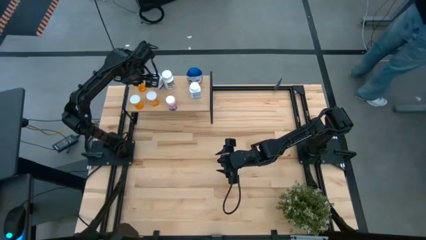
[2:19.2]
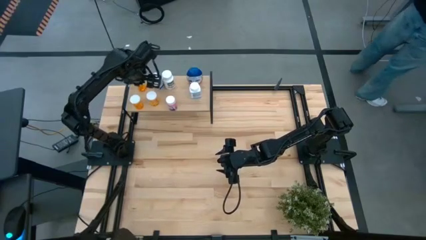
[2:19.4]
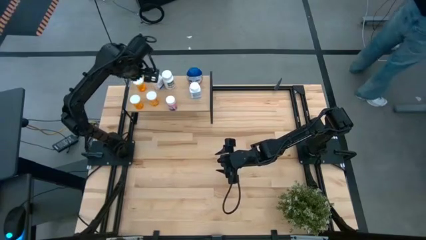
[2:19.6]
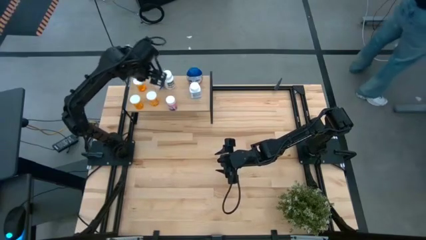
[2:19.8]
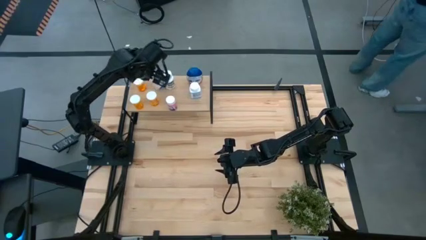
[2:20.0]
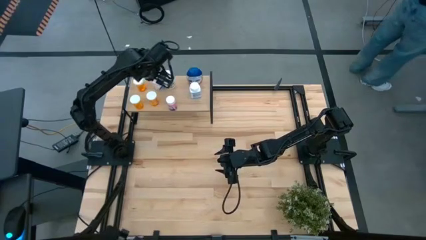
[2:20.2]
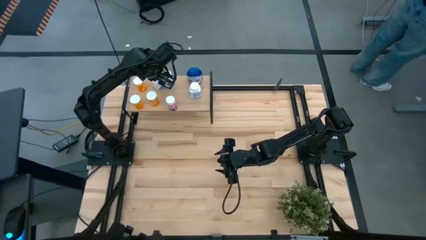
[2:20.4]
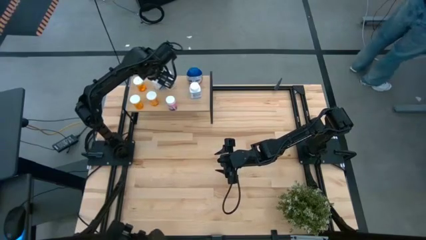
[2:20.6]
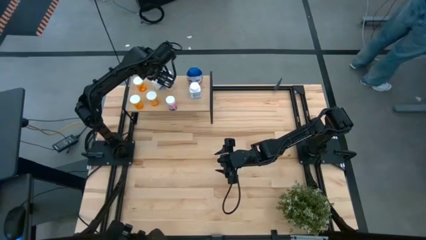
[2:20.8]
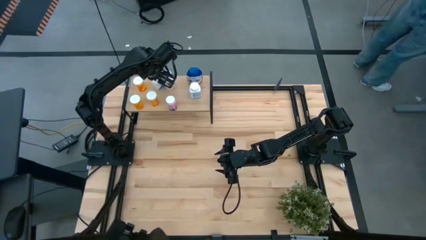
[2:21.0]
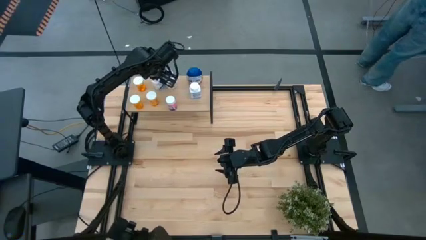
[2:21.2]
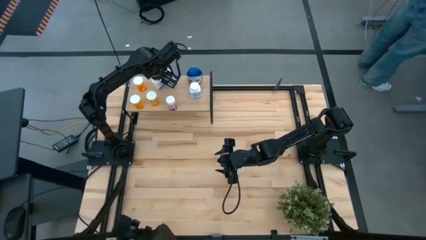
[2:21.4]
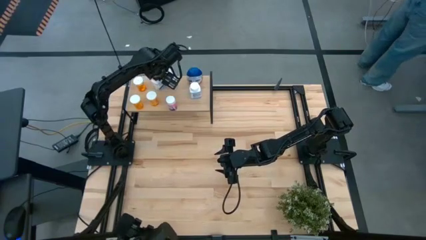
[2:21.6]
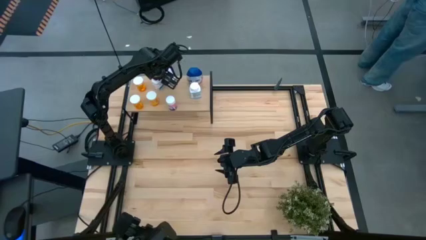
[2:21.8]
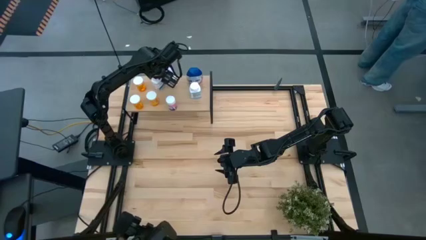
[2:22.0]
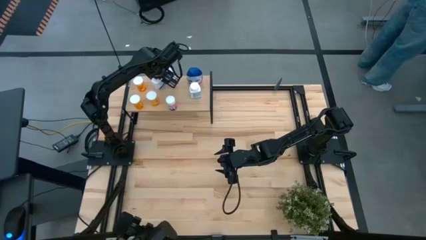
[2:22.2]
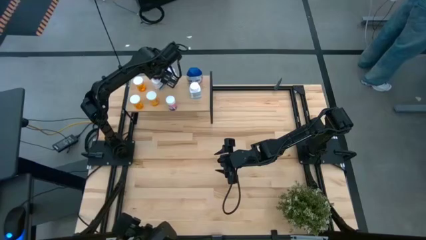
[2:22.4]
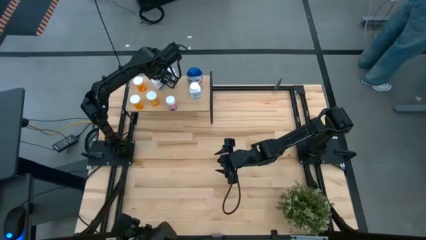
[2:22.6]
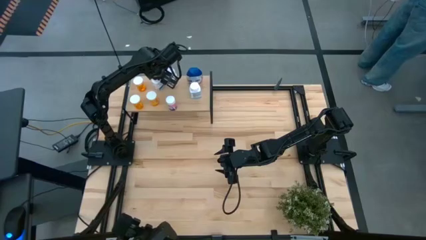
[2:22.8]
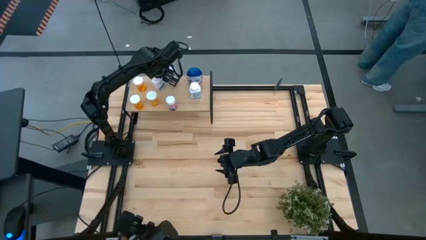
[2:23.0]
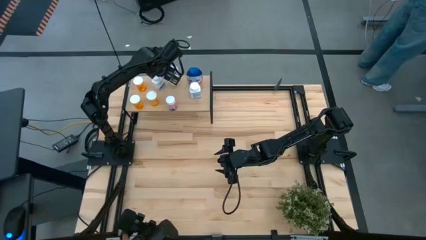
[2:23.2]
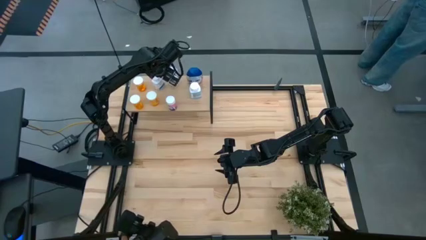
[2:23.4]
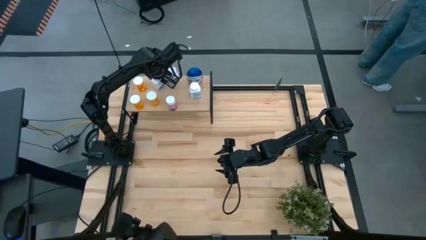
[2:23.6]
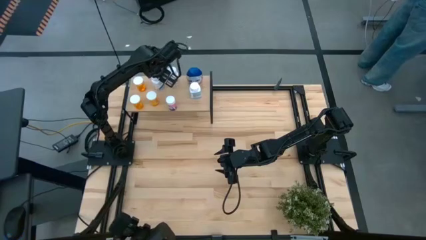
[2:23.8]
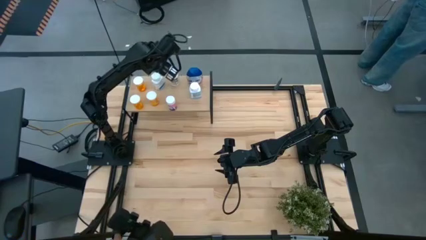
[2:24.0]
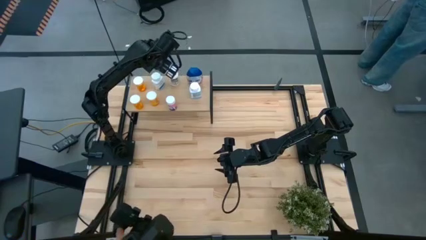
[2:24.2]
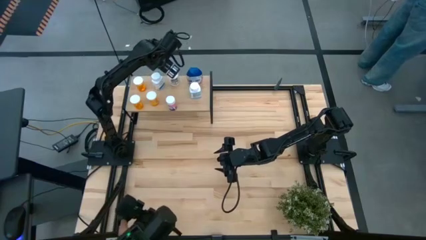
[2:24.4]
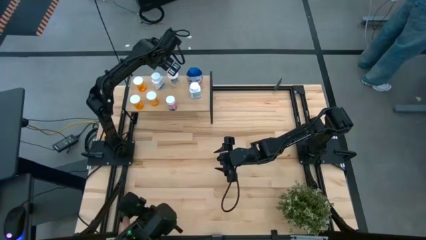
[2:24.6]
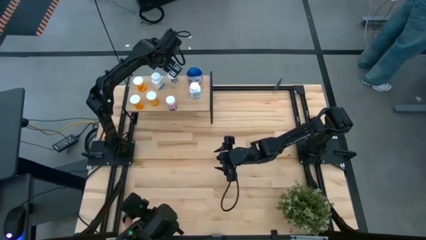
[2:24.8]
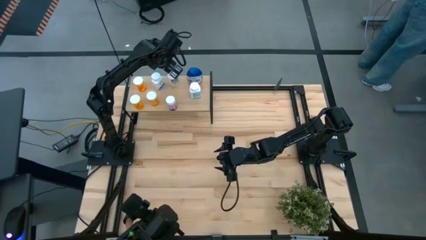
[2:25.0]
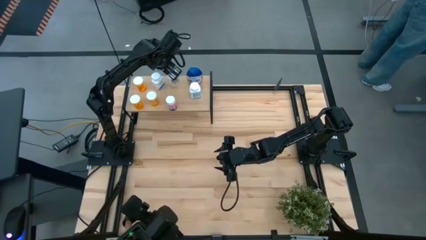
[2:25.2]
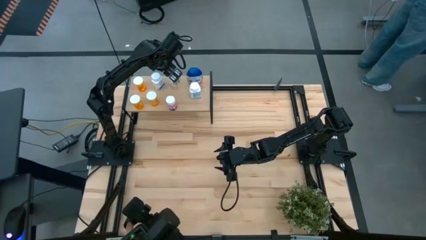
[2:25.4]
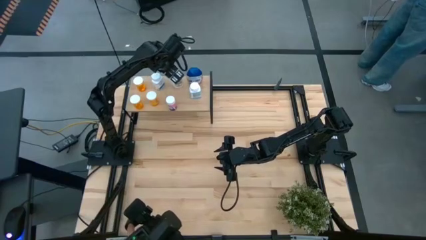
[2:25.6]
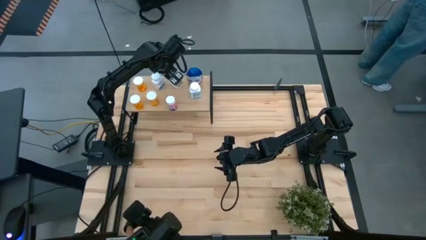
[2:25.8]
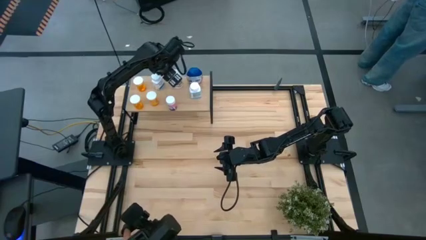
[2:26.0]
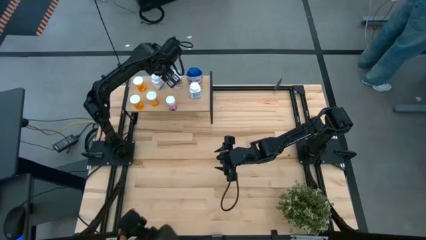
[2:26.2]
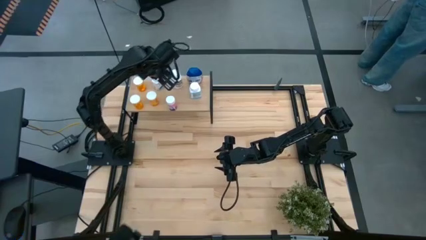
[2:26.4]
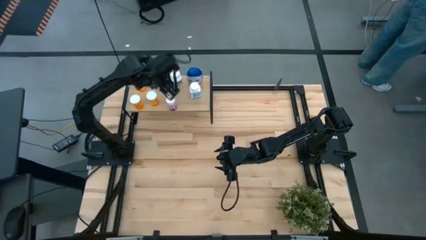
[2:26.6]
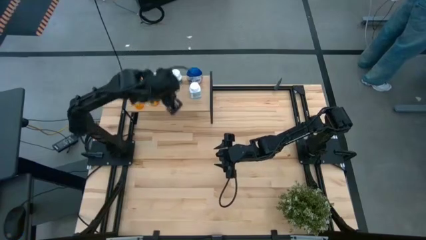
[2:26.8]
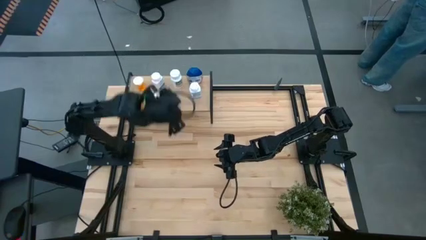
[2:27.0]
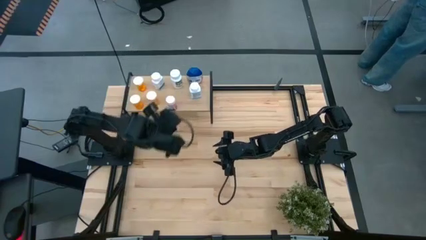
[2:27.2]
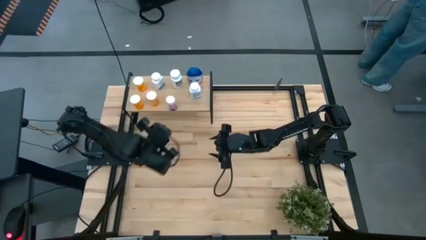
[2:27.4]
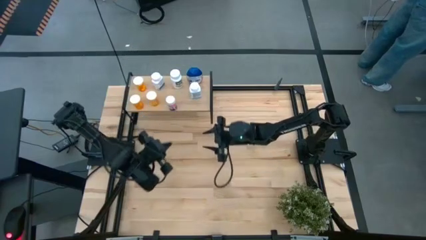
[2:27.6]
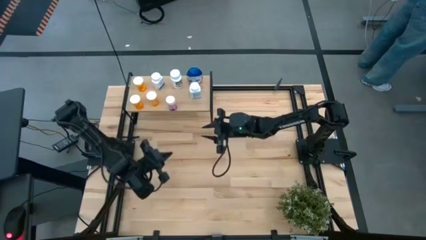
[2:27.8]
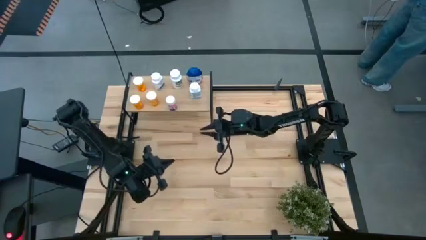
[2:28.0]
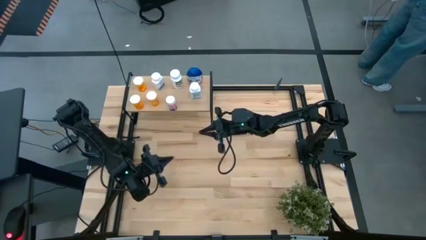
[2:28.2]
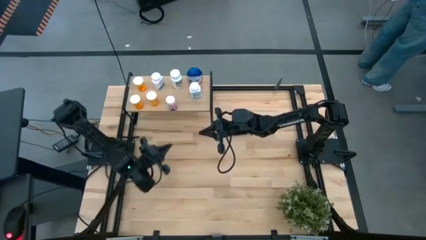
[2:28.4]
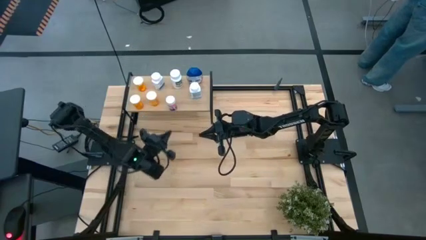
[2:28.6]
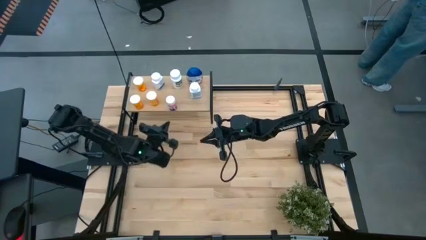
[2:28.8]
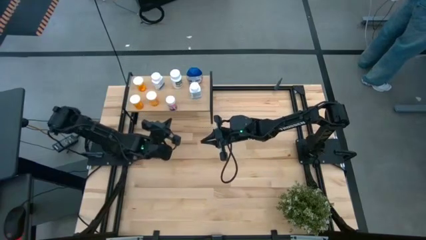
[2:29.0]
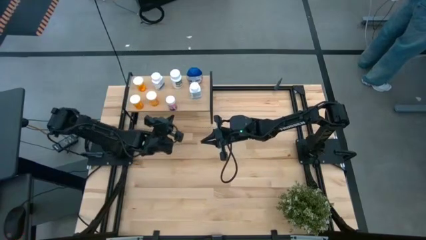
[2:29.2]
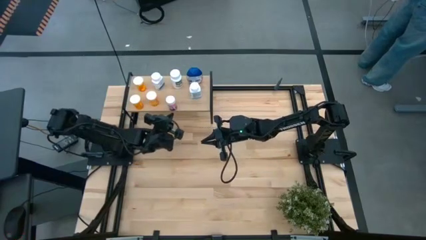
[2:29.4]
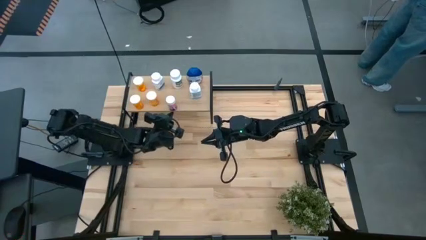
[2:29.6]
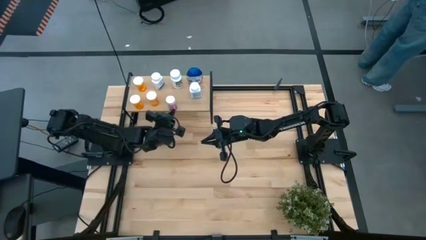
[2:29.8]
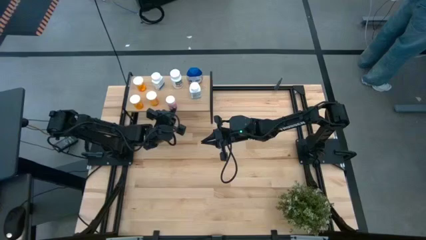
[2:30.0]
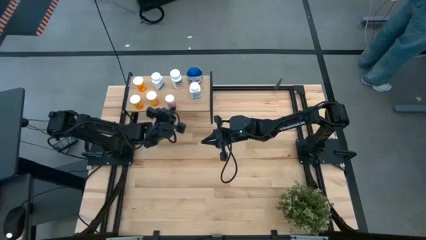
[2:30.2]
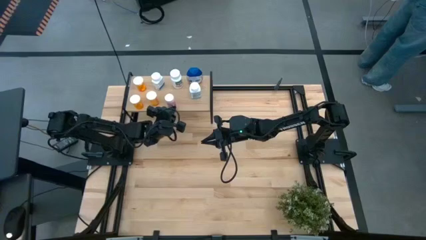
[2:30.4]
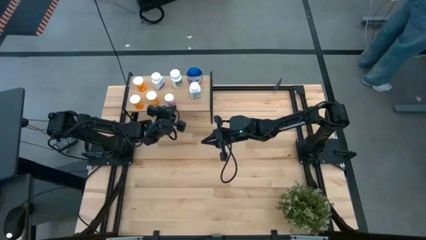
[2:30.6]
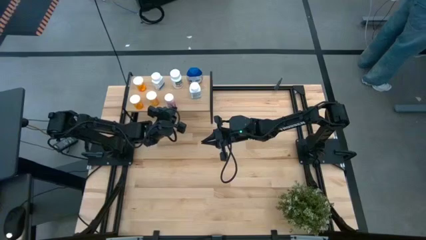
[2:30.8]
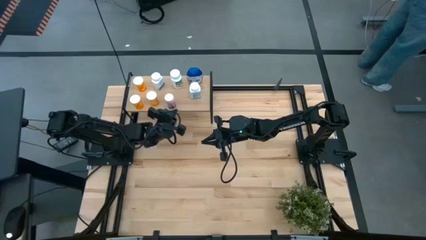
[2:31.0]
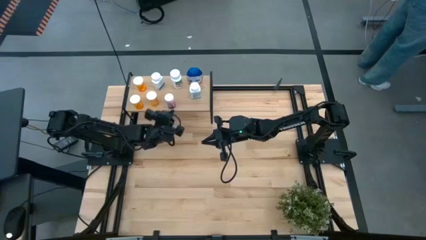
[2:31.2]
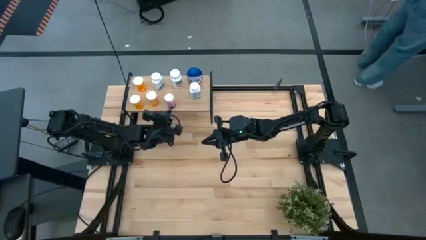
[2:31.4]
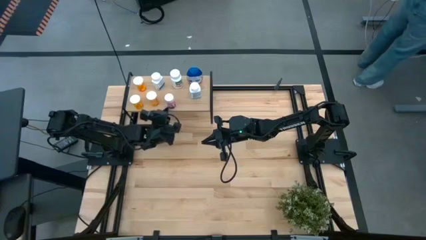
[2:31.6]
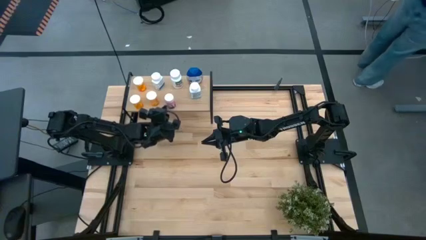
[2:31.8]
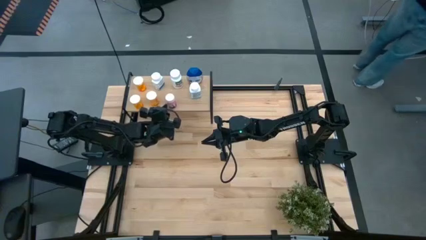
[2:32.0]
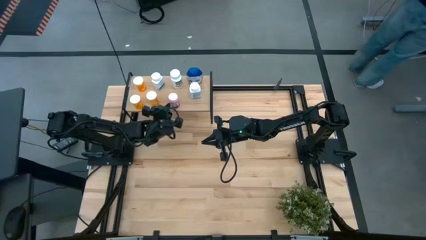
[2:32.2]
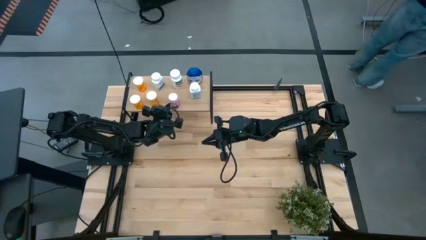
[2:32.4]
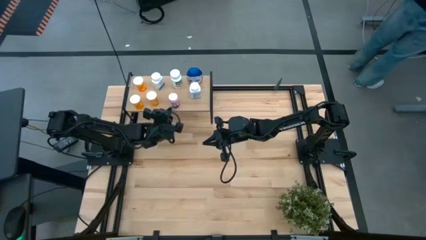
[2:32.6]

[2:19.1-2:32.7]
Task: Pick and place medicine bottles onto shelf by color
Adjust the pill bottles on the shelf

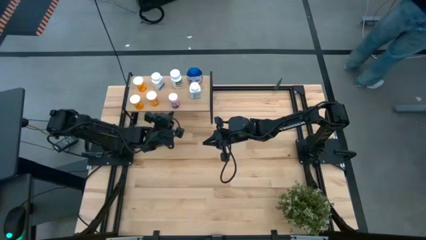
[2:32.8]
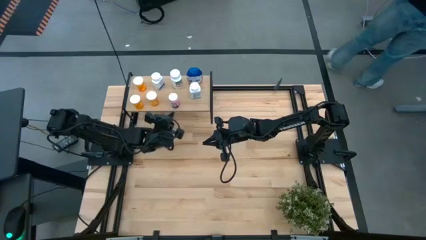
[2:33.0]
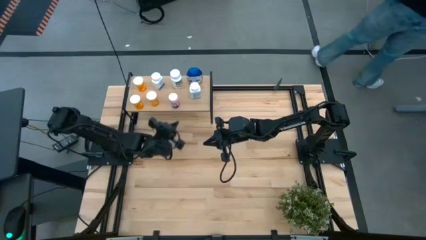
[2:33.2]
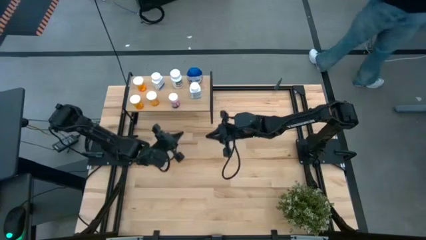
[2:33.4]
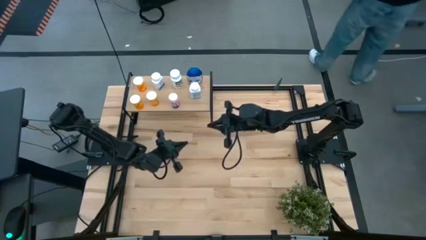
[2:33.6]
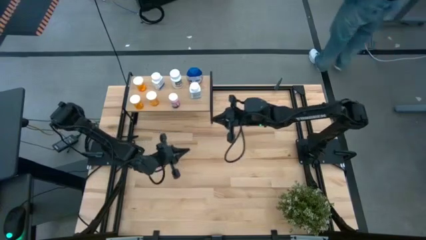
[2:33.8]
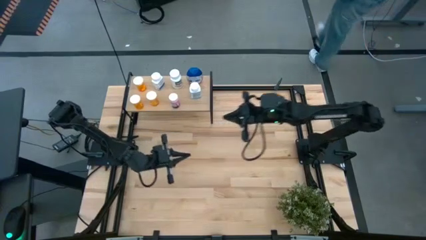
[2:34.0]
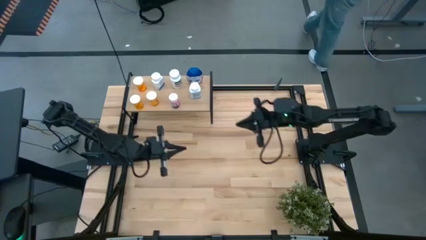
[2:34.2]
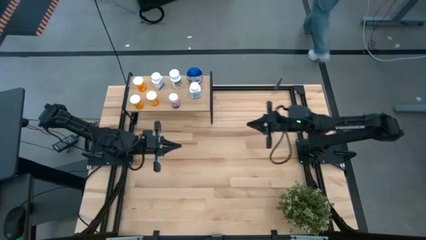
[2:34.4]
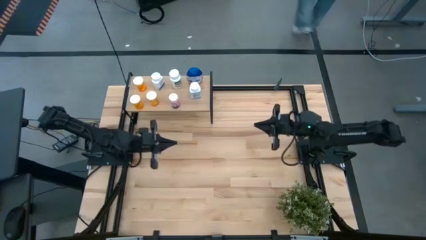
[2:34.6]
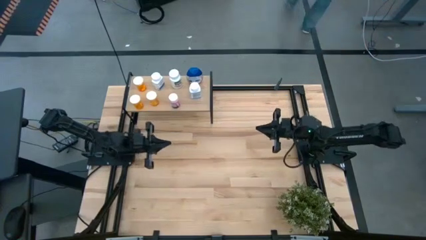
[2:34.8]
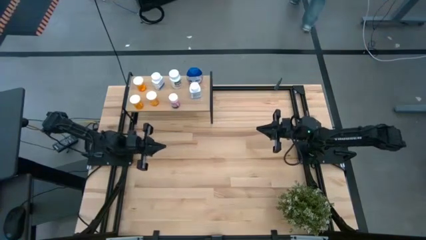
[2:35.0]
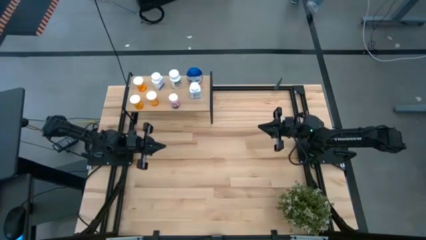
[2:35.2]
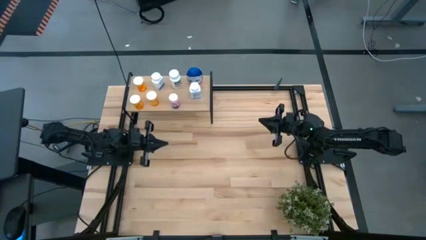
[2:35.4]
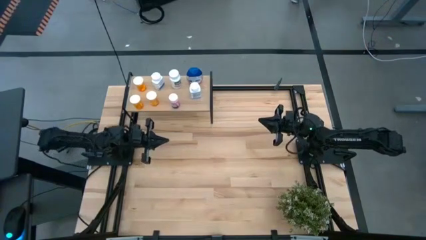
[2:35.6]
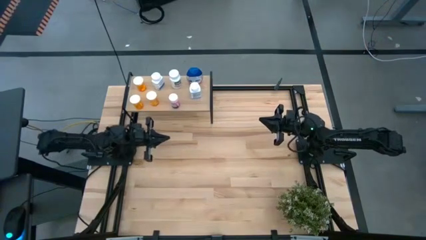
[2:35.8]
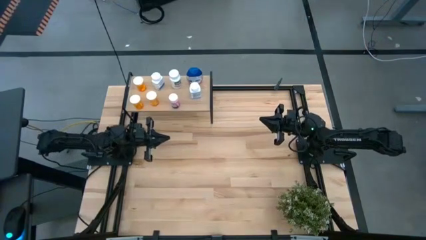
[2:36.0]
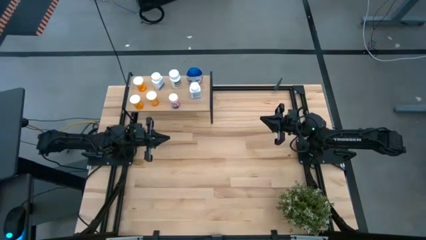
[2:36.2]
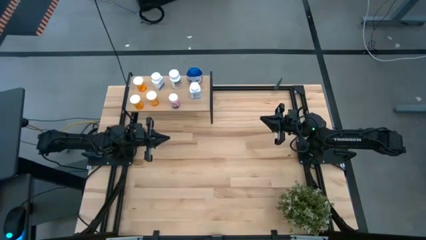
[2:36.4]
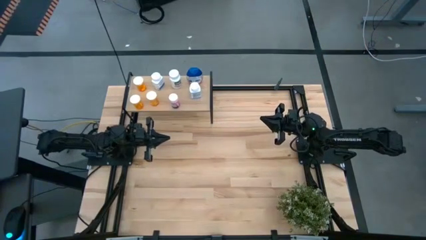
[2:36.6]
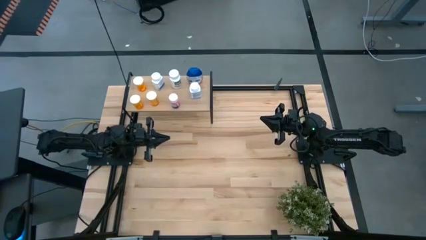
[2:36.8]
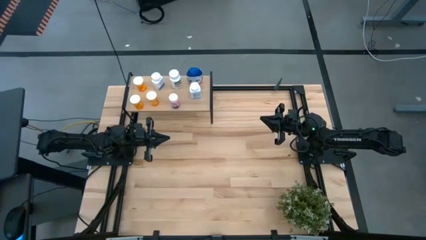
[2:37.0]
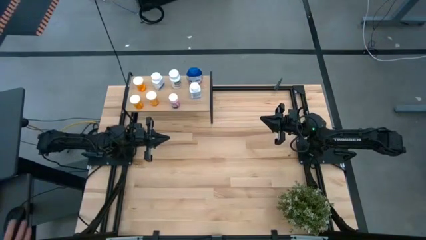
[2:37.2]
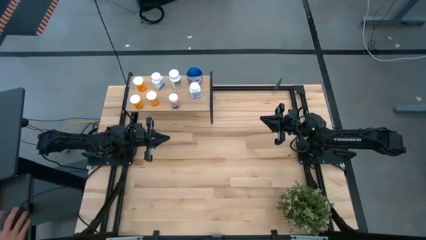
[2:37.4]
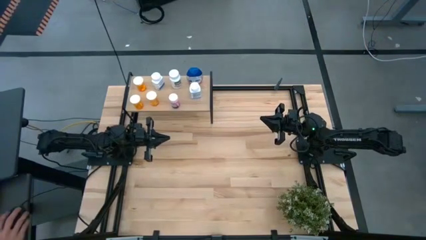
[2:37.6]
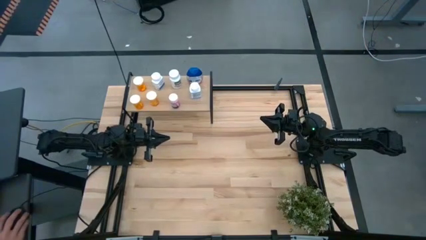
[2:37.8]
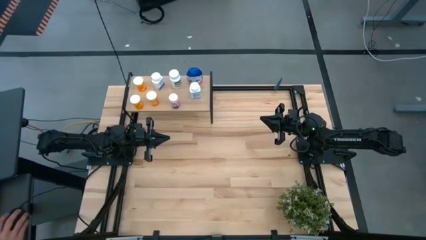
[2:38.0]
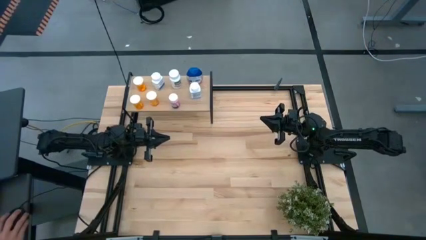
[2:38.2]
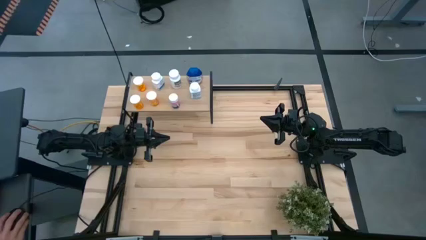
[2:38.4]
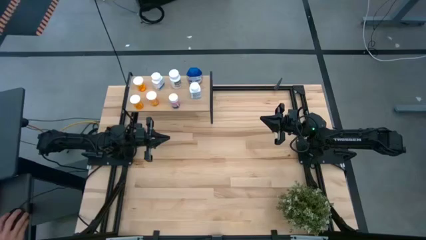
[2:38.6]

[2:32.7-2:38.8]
Return to Home Position
